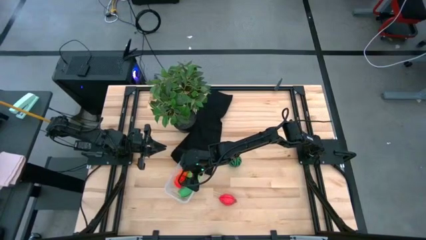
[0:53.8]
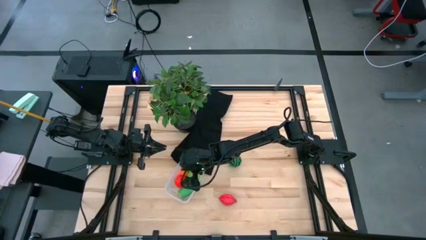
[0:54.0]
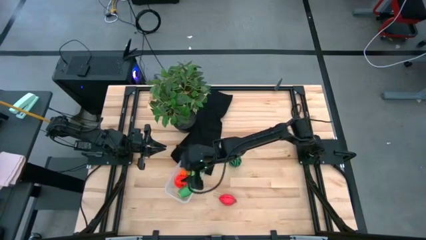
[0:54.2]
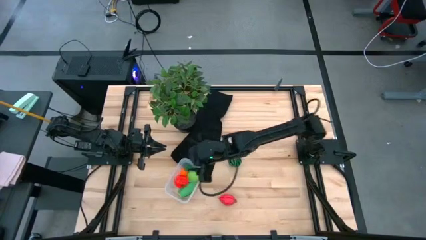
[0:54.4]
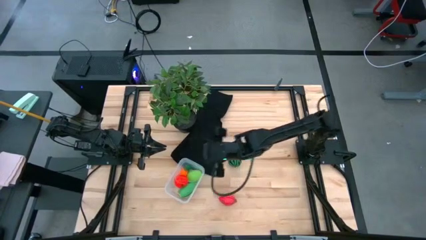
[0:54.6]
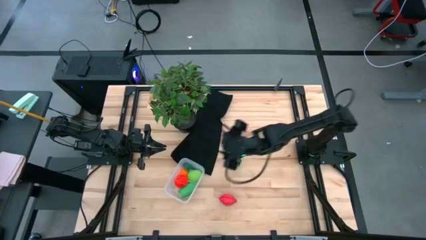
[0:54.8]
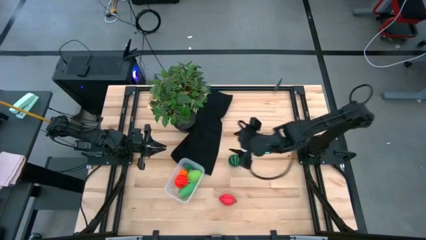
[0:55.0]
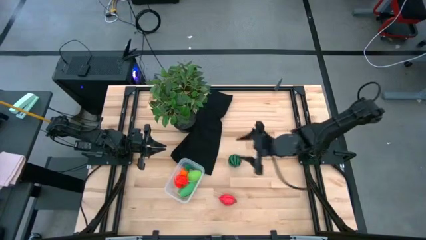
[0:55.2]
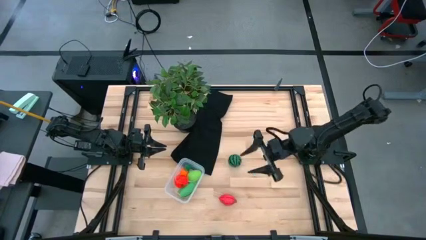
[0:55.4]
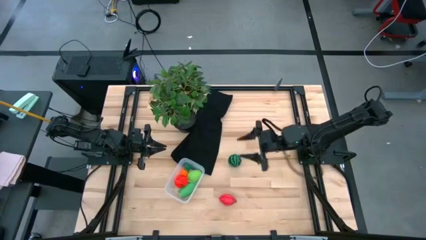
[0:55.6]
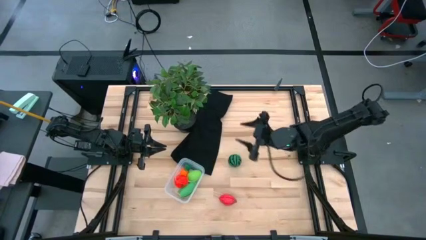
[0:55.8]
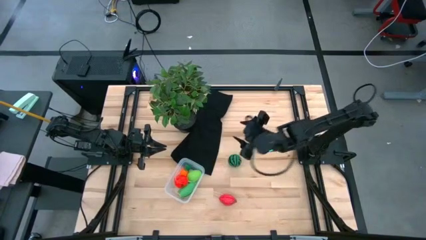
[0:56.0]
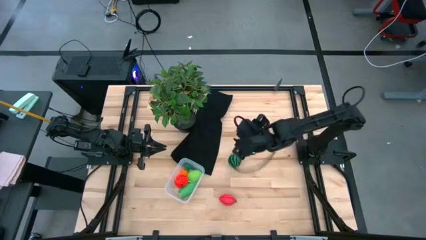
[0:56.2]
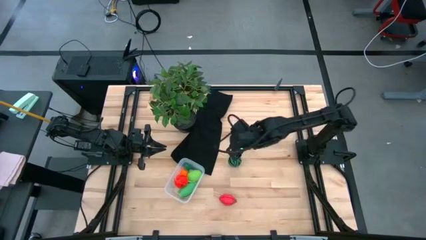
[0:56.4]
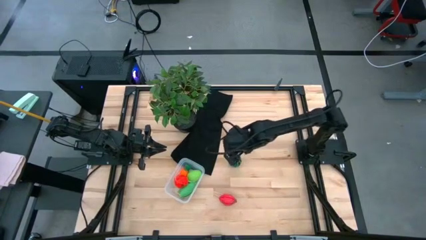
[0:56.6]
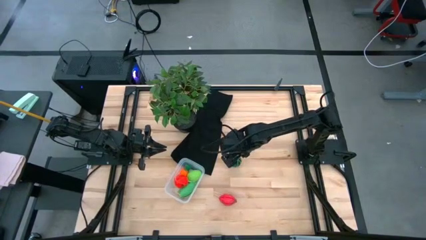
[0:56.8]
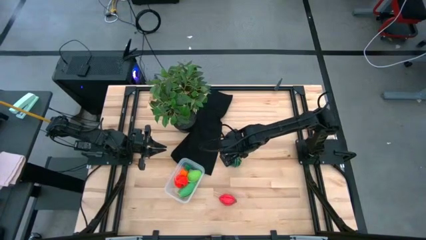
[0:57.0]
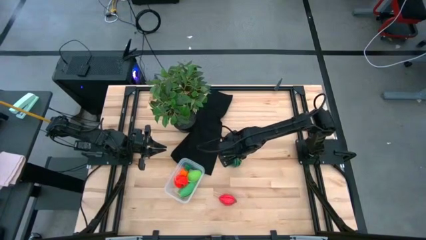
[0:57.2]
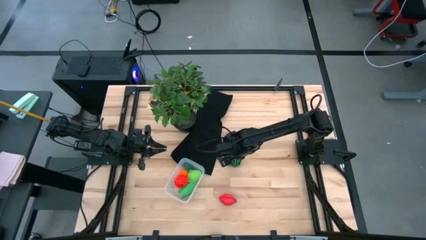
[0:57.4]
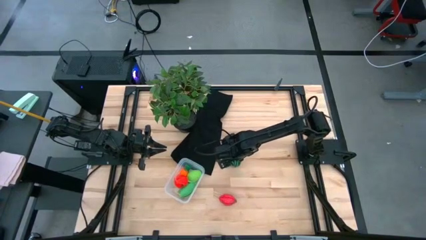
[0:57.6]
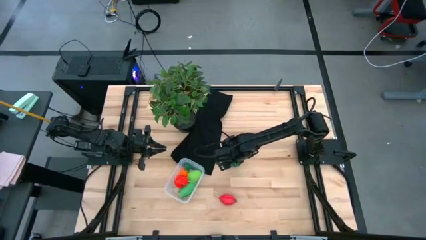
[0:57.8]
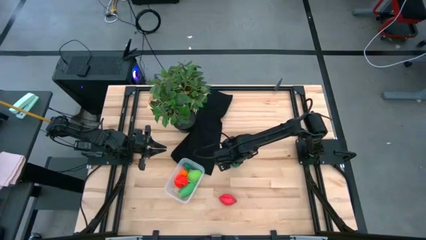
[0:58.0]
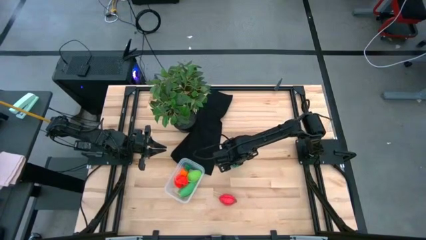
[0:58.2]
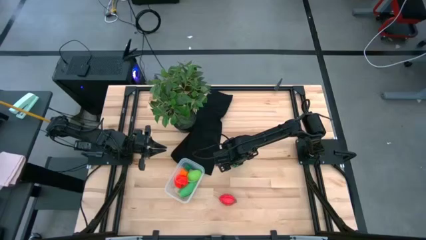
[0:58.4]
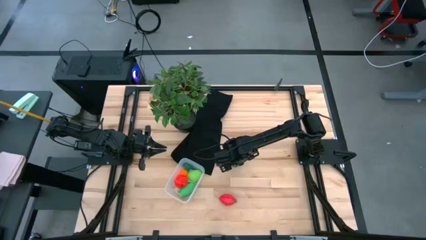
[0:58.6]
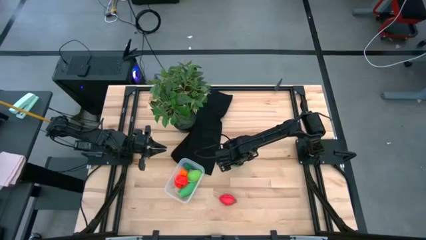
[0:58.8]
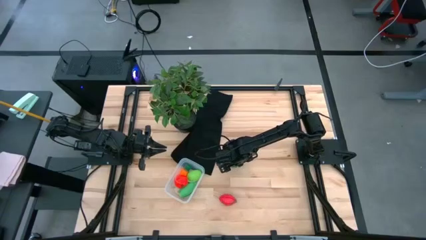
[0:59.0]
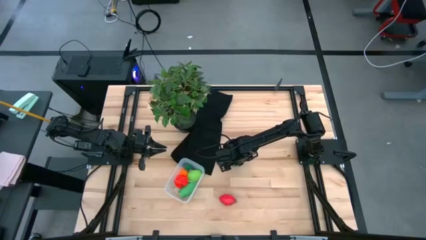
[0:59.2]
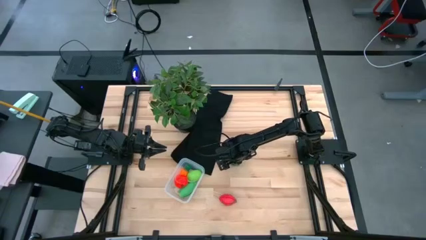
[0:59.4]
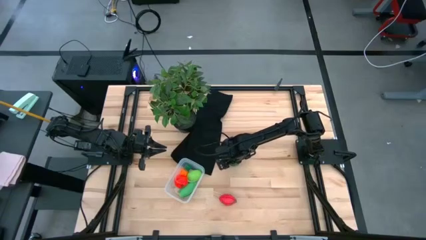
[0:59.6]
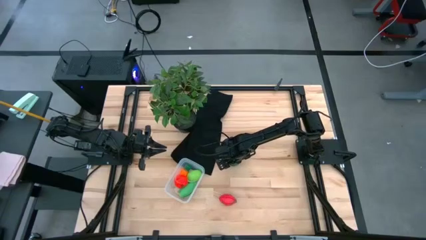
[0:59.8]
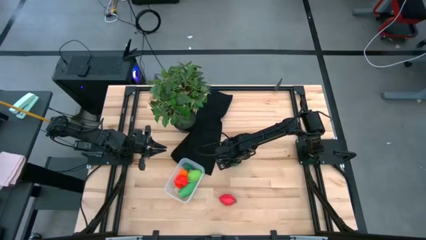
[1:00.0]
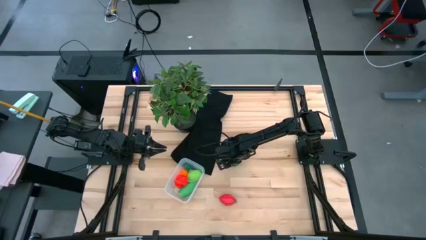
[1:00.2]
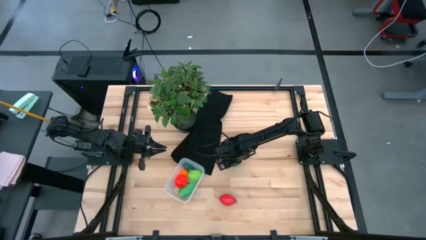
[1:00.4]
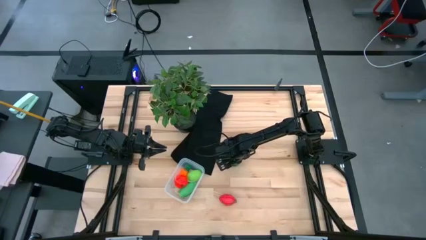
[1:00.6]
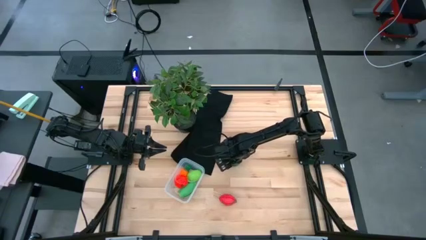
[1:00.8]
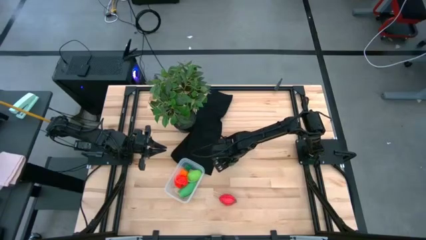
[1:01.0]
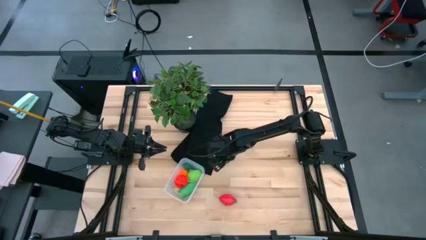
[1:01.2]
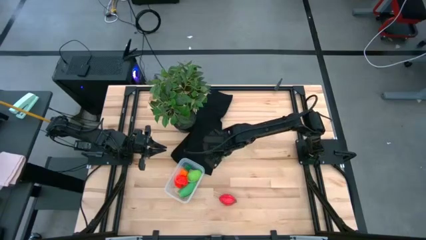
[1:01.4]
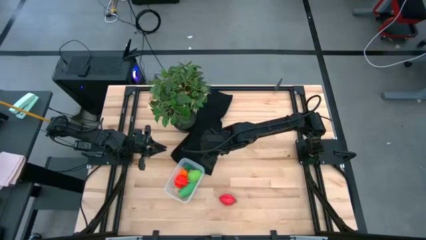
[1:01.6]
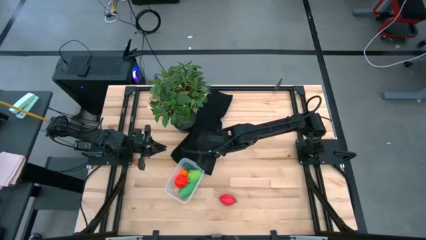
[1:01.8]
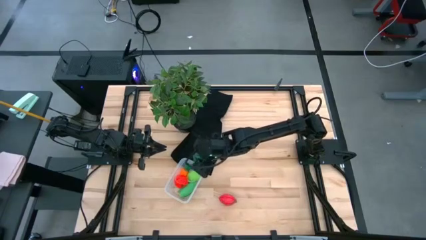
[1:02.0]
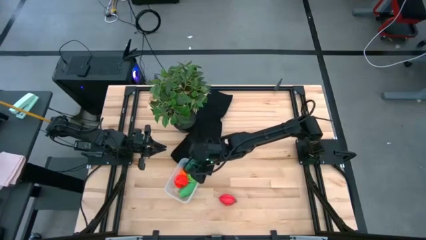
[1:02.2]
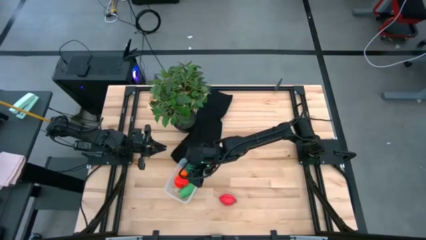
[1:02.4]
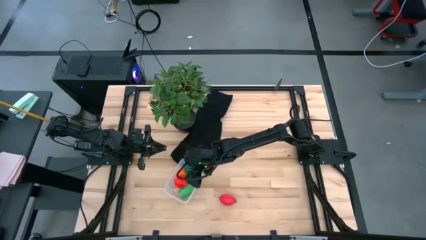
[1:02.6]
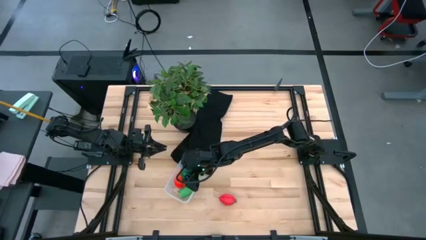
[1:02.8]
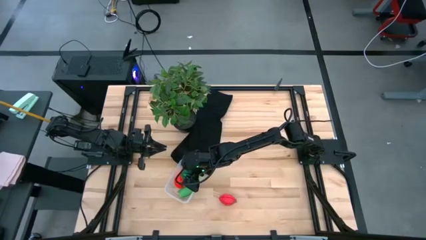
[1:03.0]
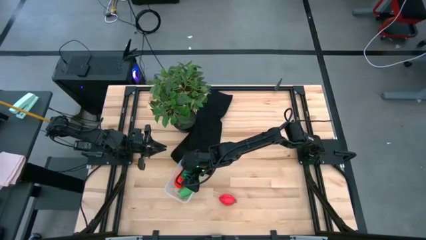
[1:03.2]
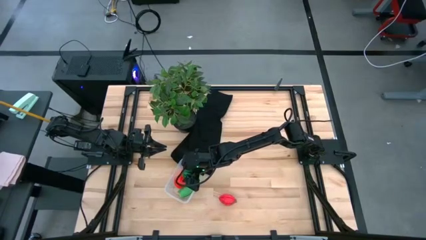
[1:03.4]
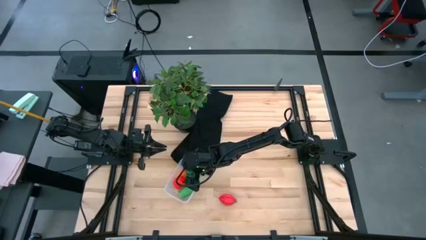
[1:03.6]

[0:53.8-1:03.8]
Task: Pick and placing Produce into tupperware
Put the dark green watermelon into the transparent bin

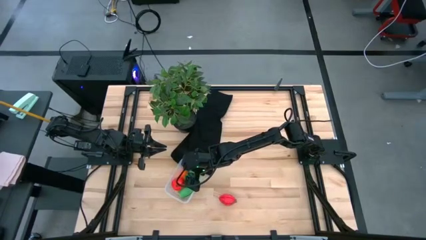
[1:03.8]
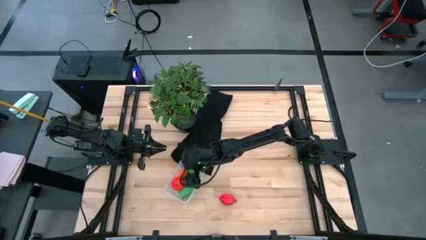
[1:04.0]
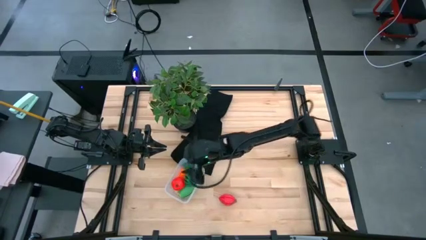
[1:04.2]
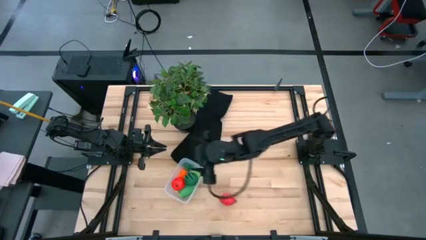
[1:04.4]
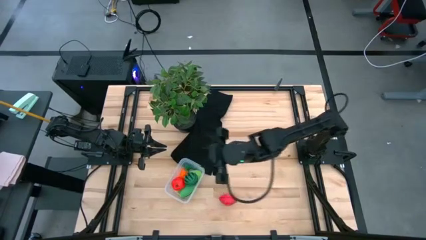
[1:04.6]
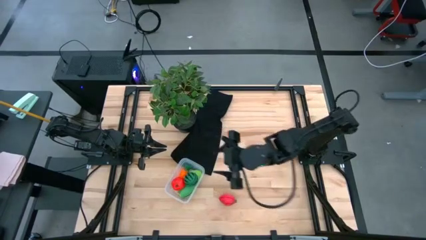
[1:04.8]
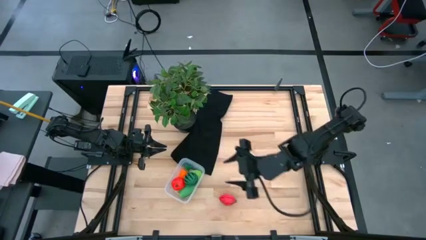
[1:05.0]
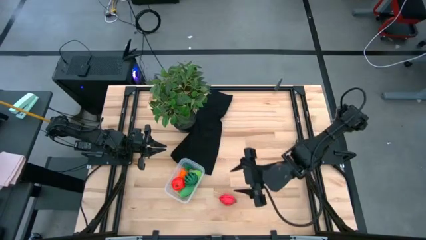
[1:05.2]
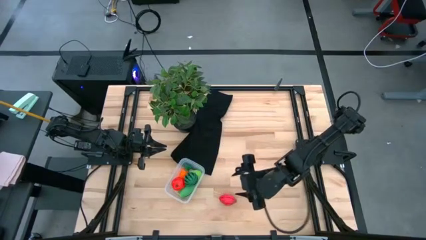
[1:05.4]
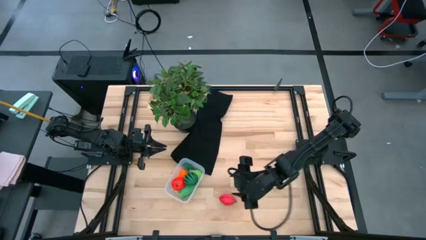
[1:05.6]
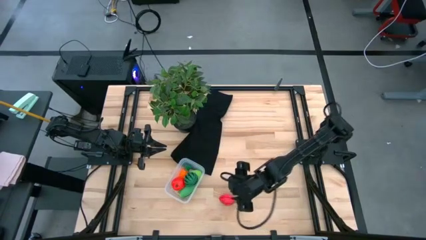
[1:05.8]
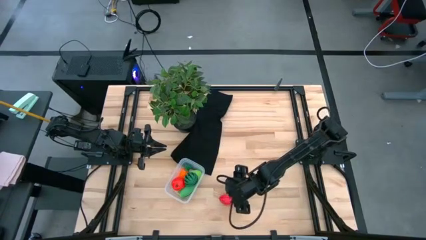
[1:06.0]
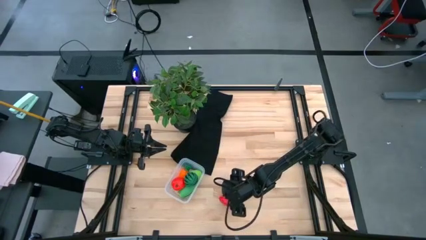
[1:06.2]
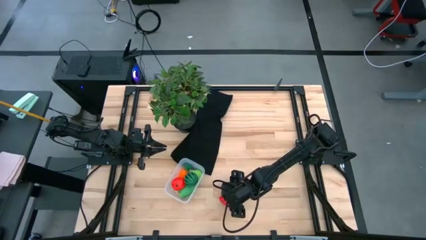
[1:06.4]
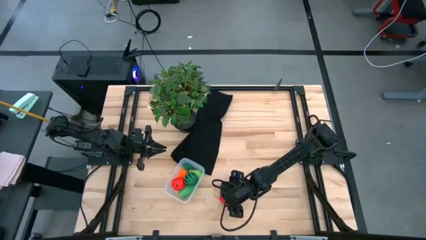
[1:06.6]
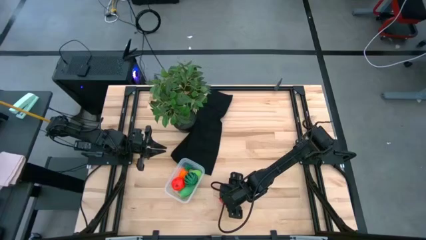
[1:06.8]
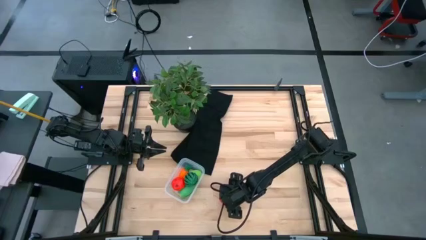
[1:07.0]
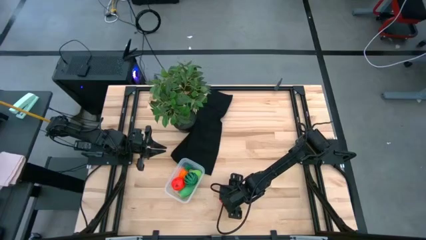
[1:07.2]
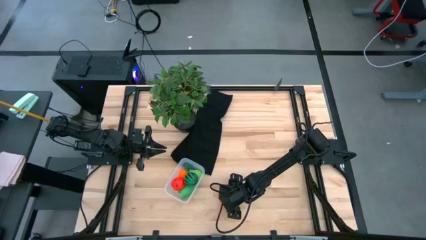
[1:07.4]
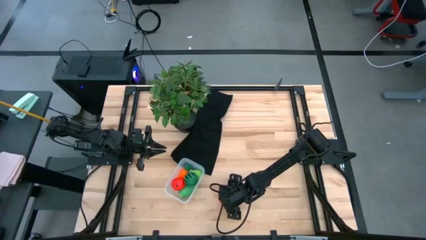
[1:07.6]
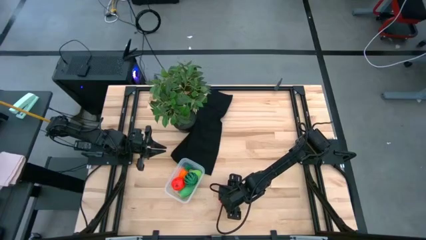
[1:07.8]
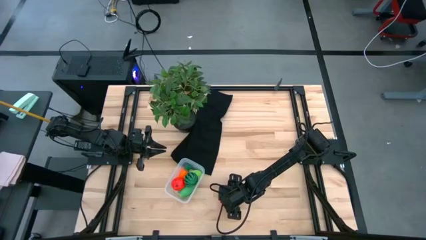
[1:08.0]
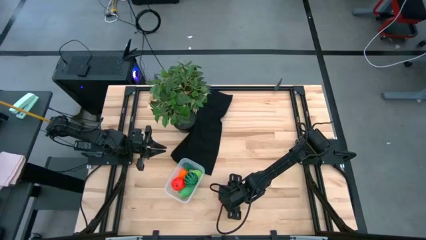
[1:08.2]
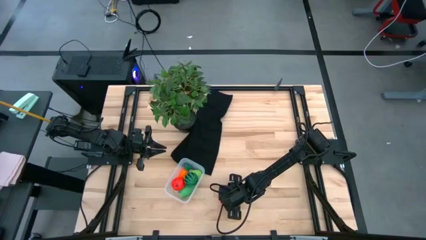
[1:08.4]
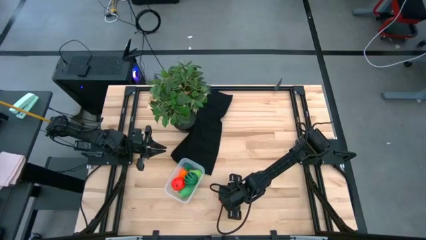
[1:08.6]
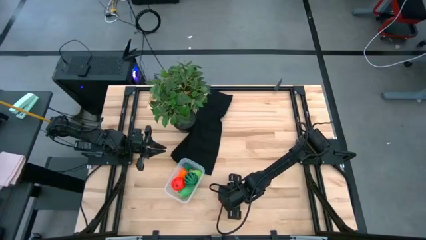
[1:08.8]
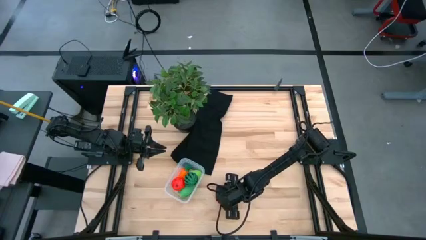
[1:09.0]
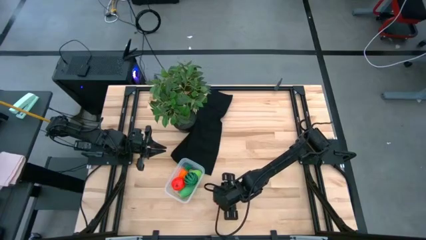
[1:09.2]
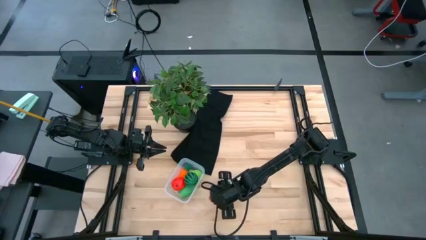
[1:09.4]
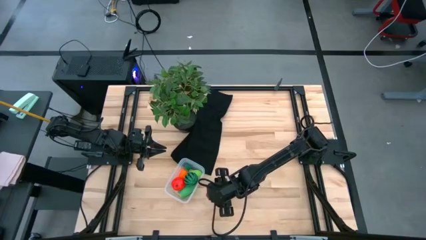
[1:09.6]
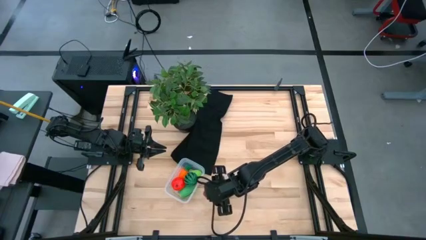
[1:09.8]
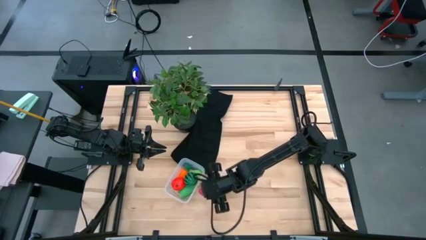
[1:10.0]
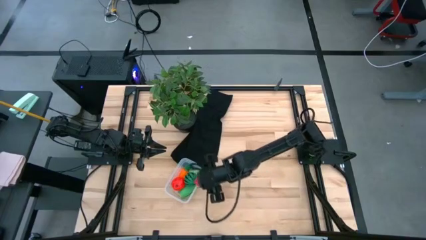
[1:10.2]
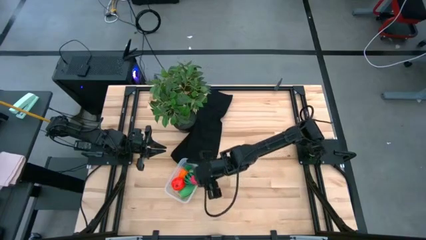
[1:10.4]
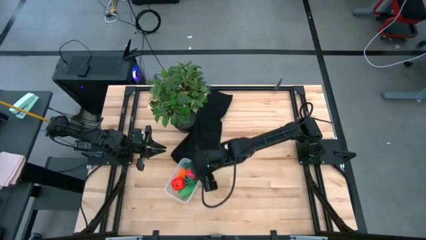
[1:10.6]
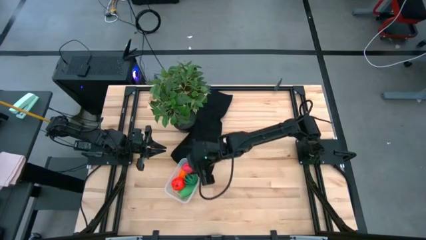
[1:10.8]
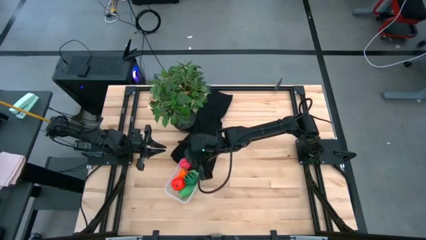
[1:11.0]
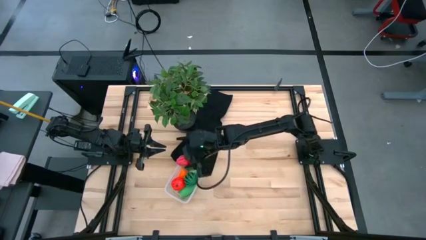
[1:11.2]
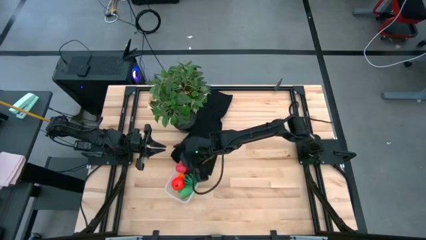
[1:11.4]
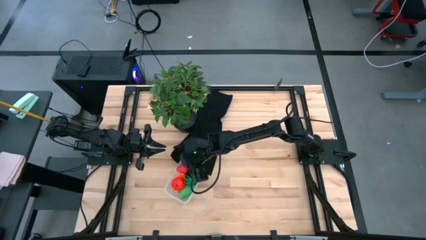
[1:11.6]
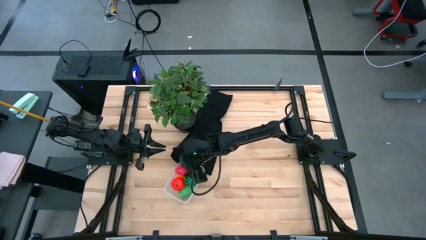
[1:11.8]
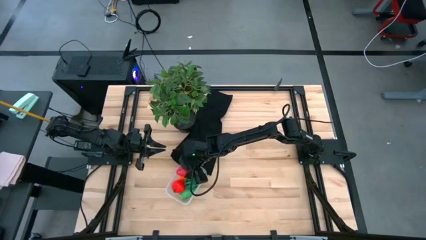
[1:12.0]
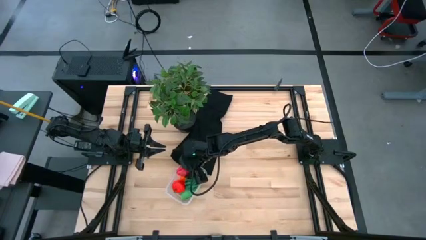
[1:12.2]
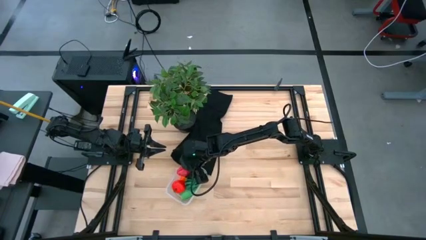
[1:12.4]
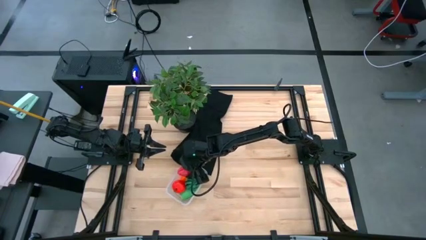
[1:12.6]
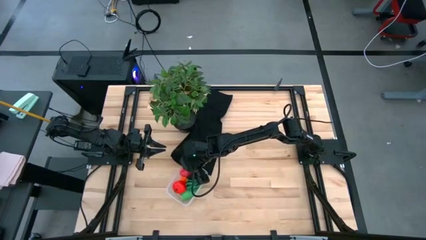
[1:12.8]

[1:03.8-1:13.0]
Put the red dragon fruit into the transparent bin
